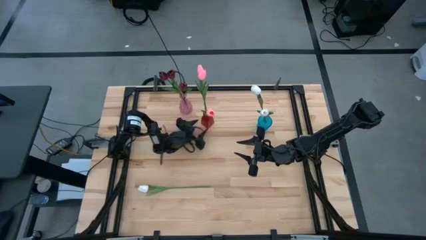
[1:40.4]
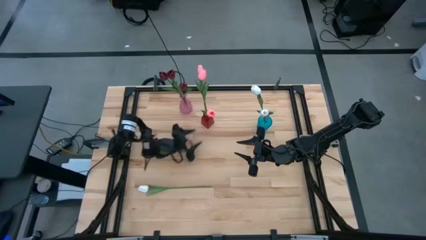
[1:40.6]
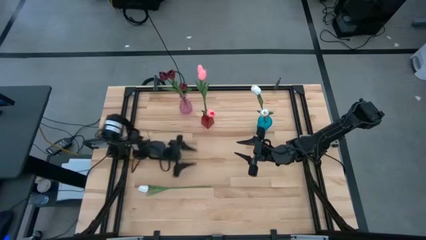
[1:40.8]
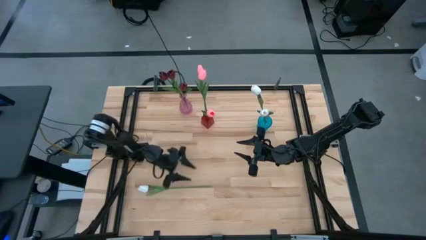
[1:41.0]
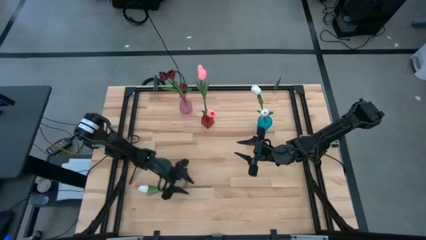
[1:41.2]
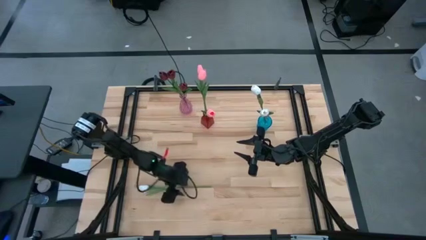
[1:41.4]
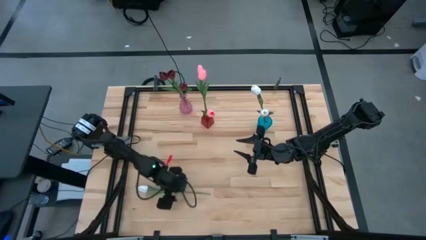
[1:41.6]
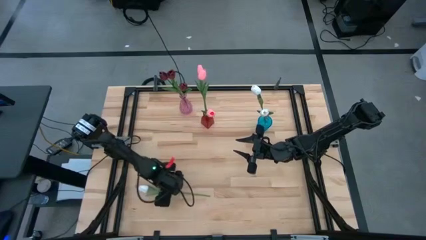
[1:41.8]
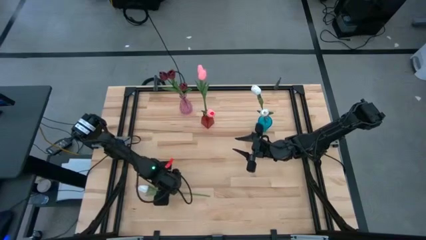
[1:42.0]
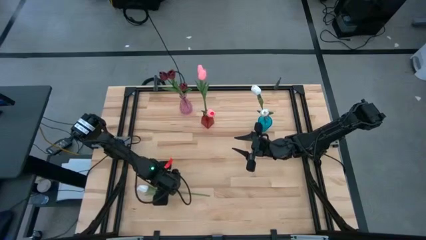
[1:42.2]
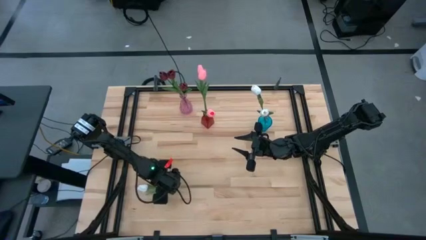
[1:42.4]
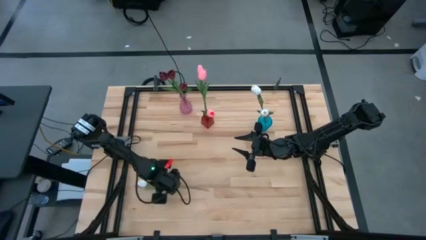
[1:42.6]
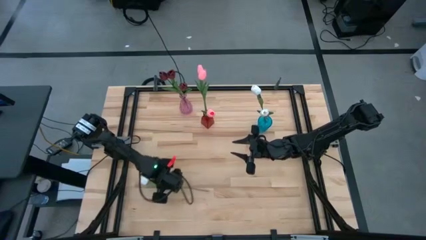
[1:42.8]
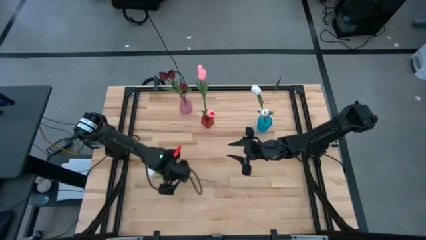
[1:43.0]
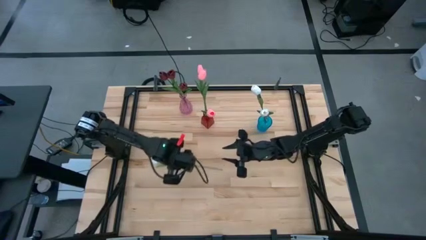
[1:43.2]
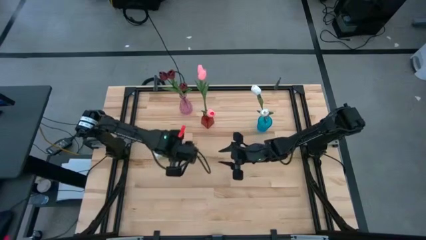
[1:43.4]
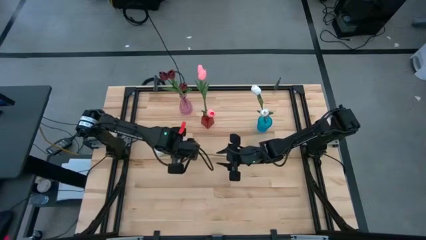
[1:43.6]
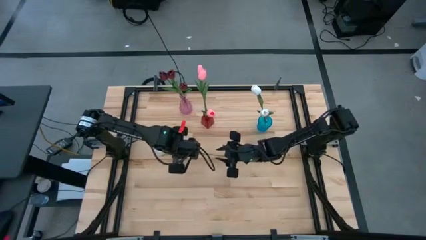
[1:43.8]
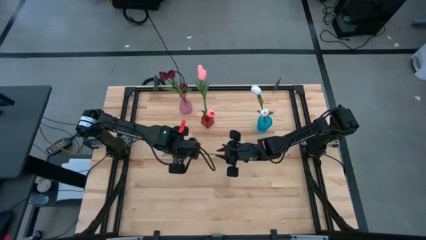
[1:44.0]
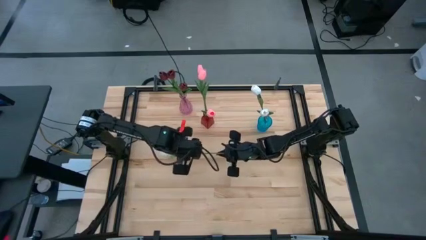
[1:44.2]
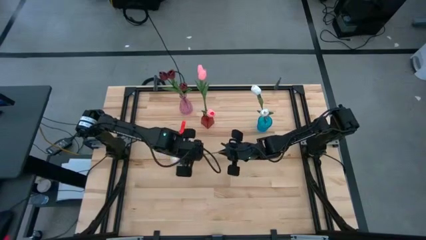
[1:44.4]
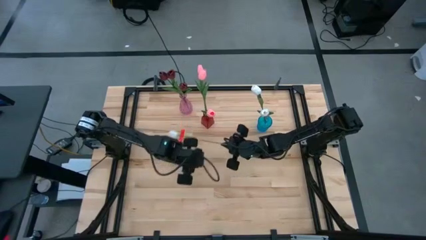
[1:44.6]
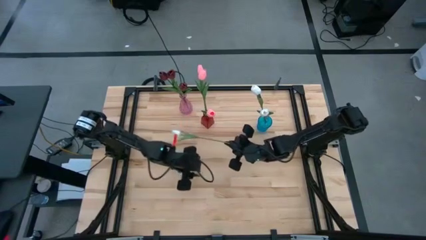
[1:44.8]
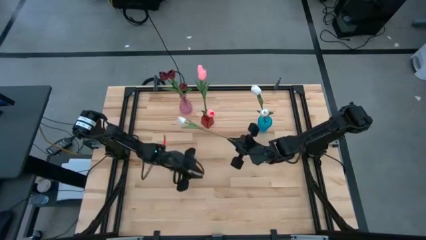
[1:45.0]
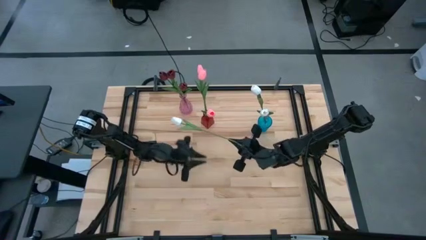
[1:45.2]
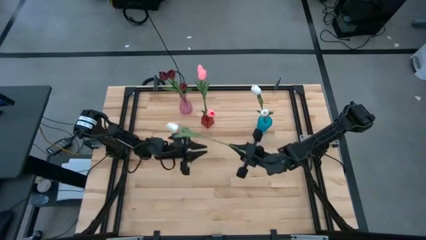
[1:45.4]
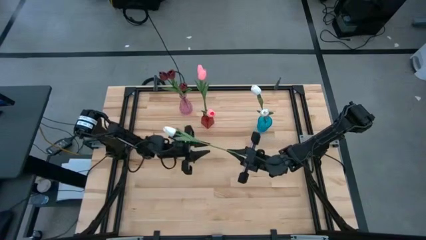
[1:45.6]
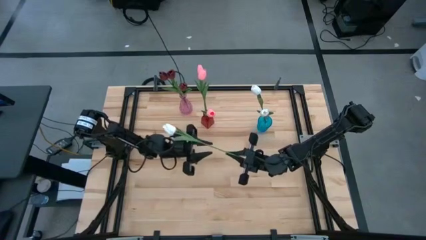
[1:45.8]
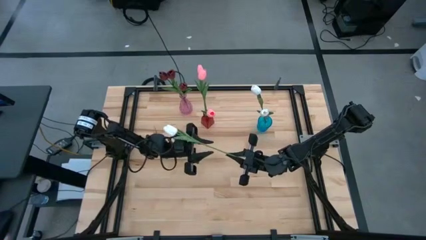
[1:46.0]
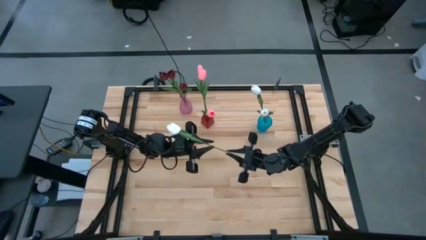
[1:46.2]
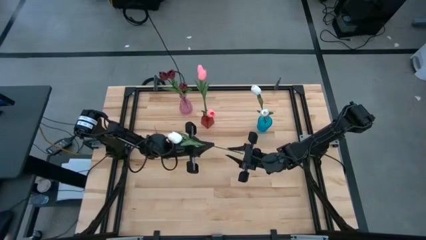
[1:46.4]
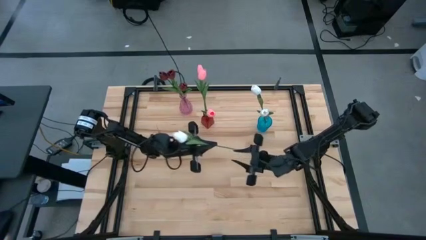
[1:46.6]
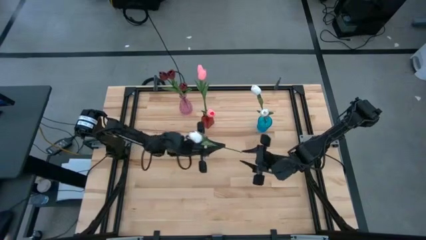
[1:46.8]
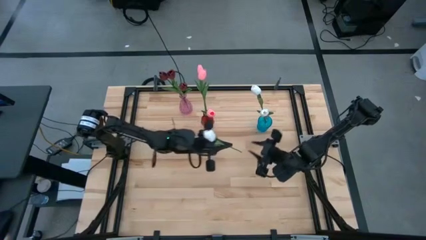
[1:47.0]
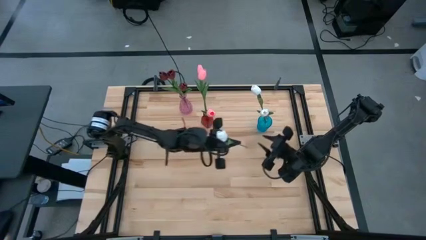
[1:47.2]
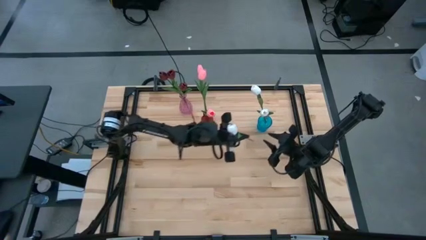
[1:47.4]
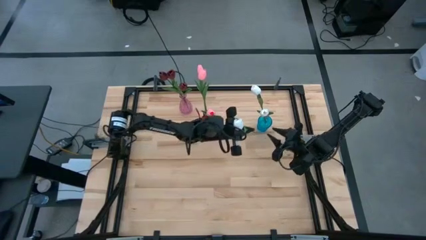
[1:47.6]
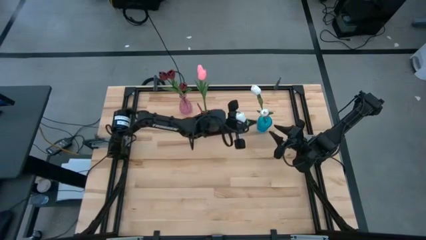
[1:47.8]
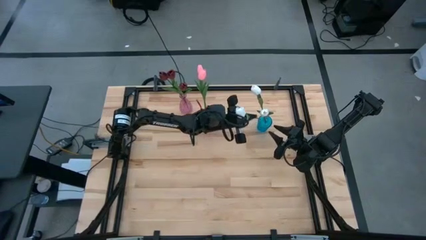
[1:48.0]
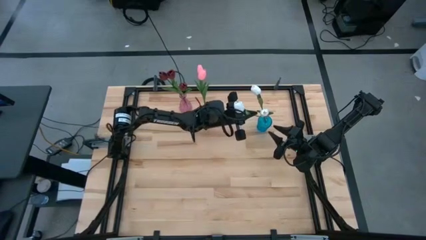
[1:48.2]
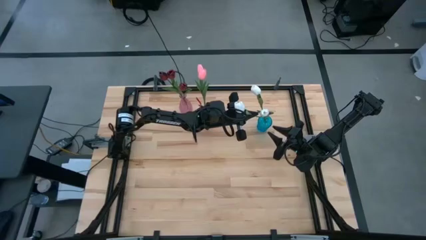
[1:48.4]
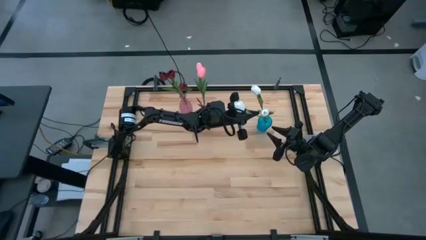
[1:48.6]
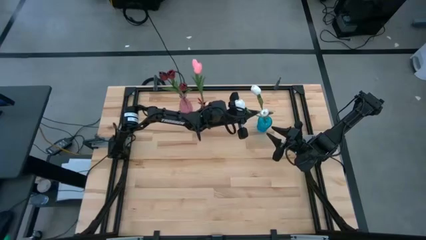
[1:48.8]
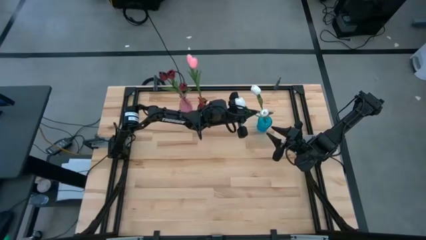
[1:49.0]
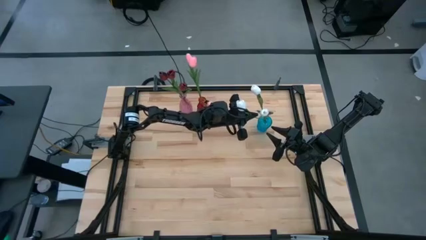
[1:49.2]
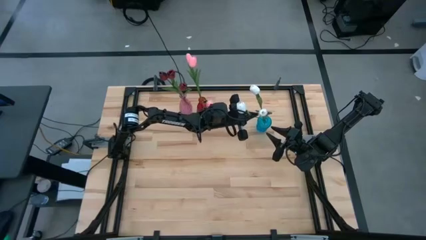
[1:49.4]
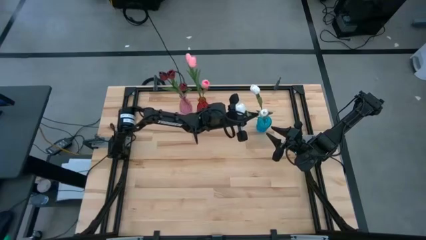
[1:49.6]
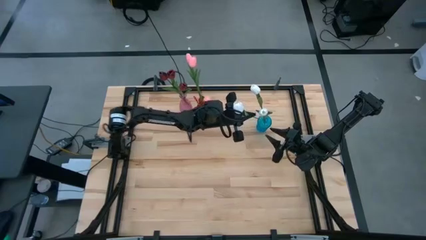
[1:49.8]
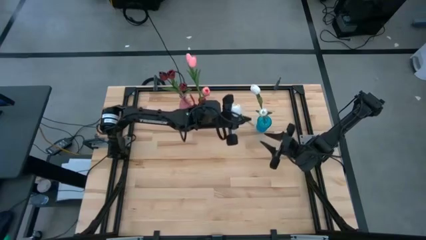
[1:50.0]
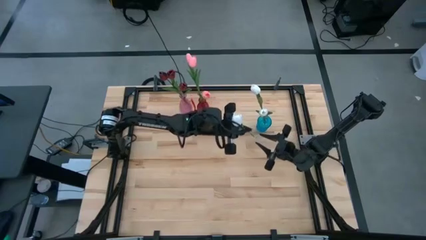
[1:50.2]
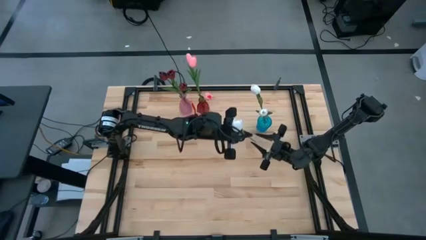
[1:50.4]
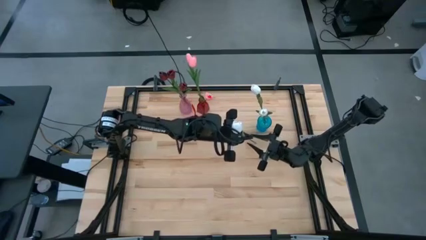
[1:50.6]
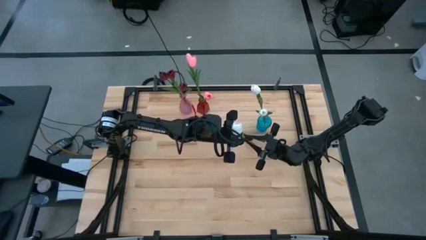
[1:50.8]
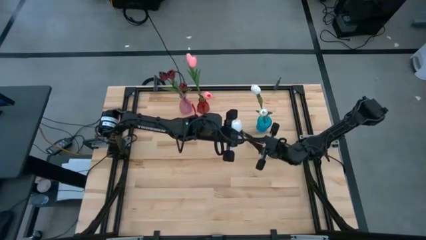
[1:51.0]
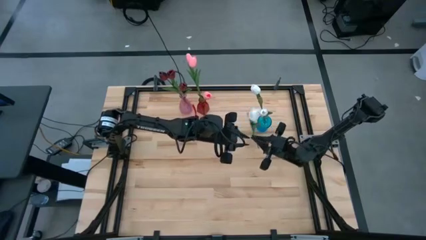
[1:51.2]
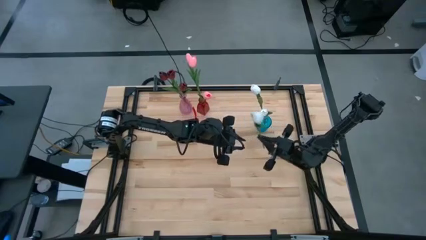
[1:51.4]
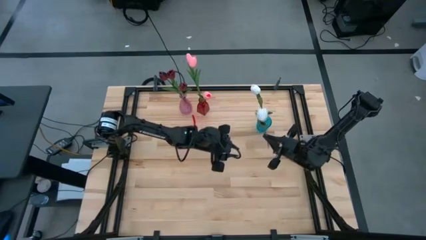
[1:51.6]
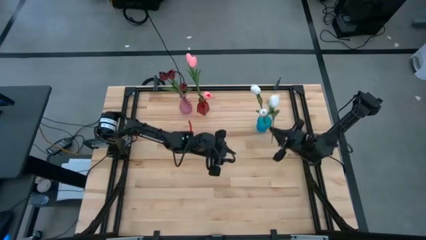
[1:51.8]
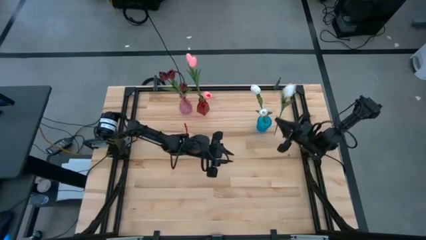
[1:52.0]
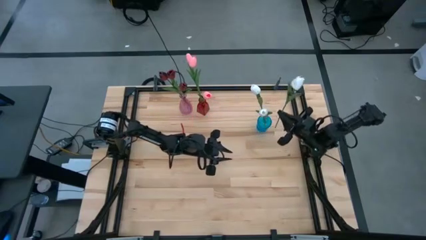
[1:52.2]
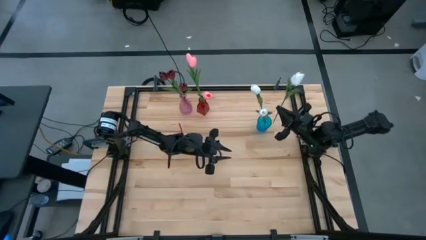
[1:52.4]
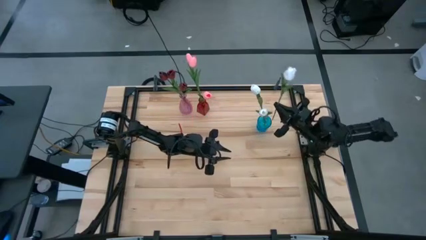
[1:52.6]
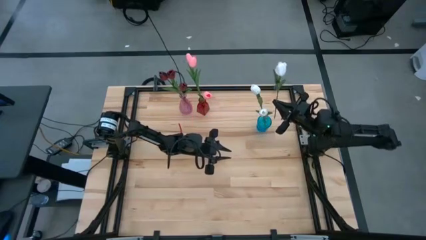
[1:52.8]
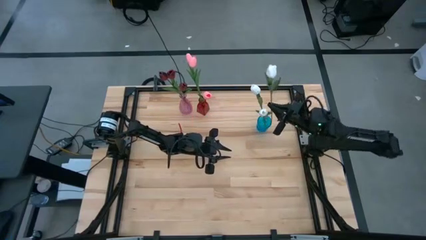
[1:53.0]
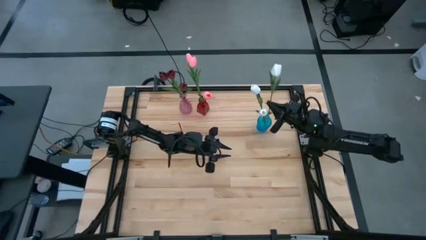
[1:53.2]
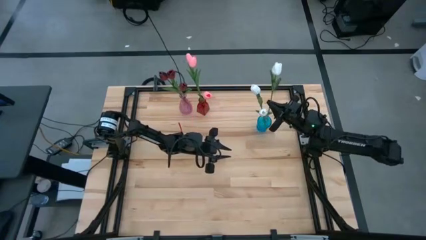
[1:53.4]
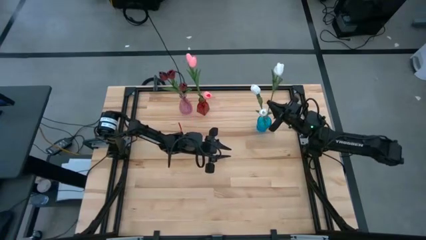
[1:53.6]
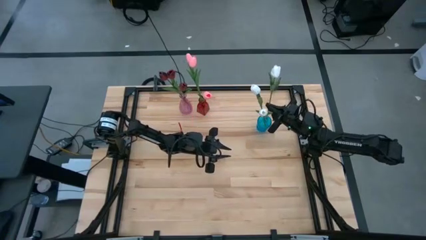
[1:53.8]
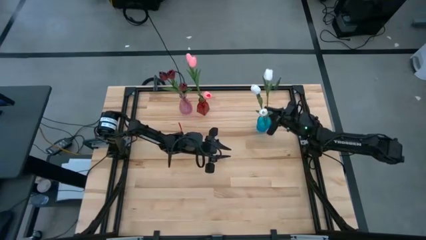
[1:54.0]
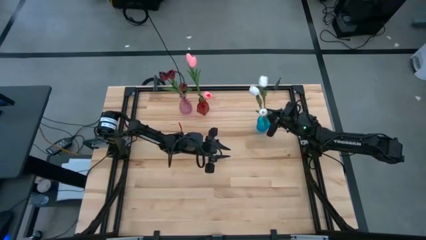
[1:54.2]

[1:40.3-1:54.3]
Task: Sort flowers into vase by color
Put the white flower into the blue vase

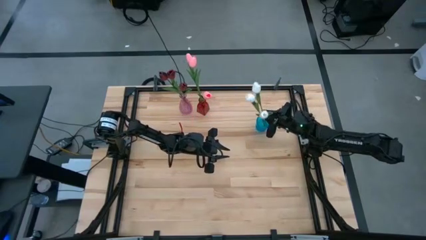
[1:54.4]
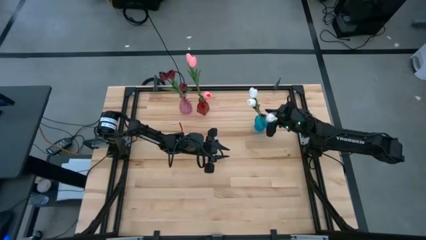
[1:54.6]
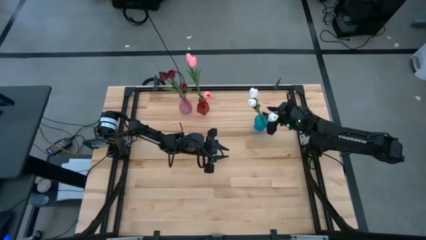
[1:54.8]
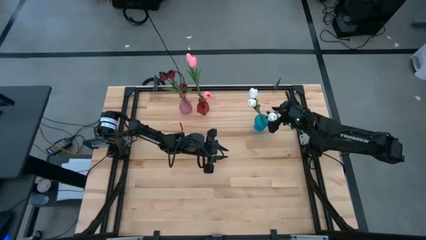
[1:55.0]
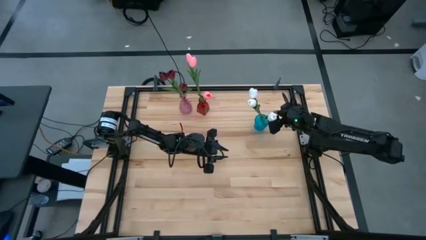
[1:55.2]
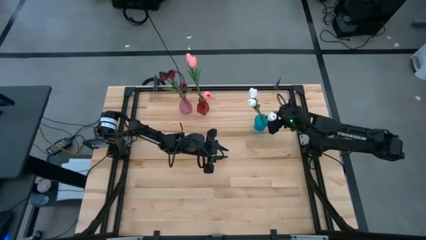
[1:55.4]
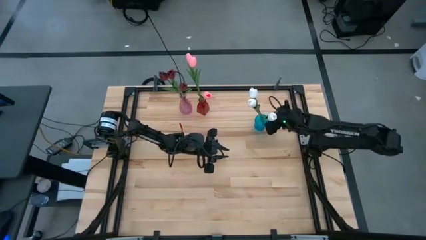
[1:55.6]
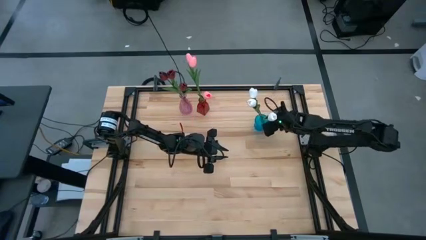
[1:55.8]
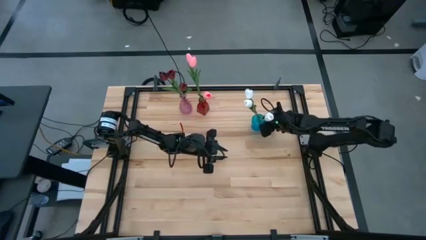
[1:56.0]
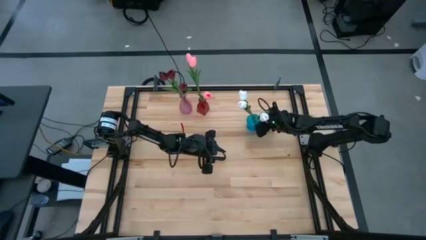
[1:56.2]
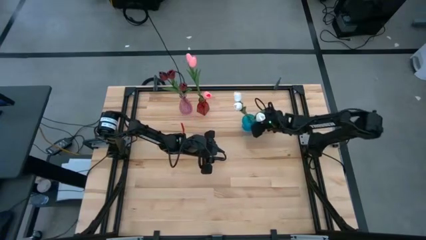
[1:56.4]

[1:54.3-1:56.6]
Adjust the blue vase
